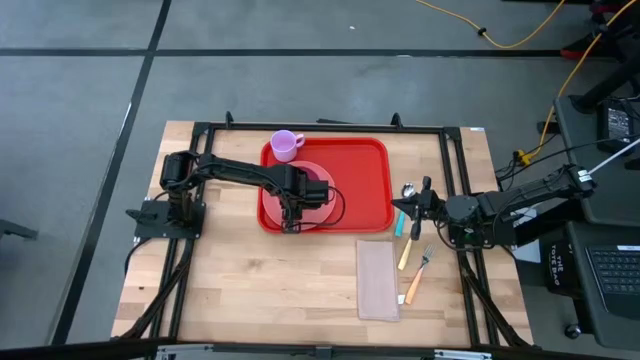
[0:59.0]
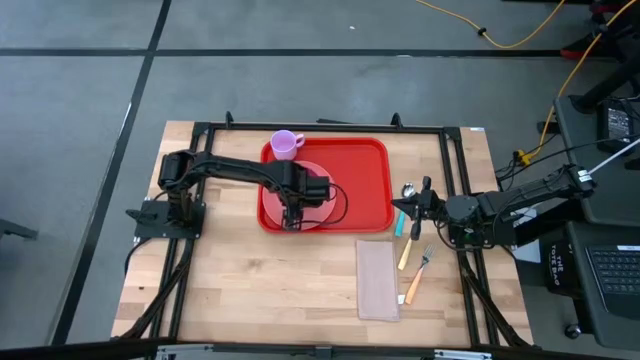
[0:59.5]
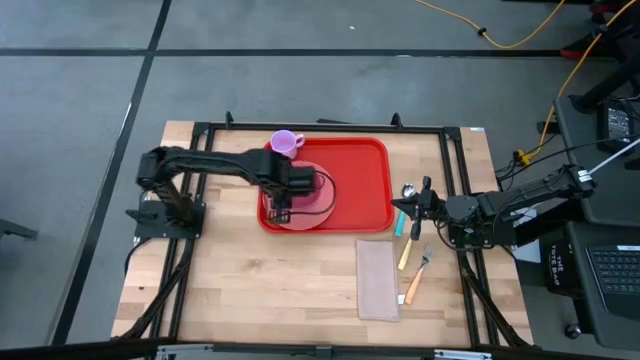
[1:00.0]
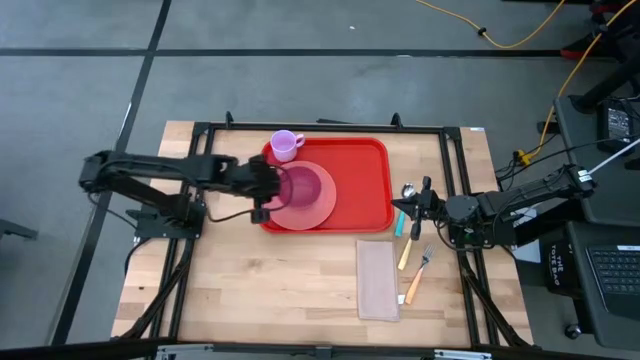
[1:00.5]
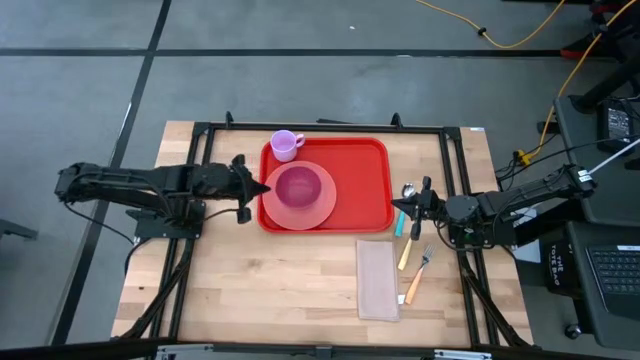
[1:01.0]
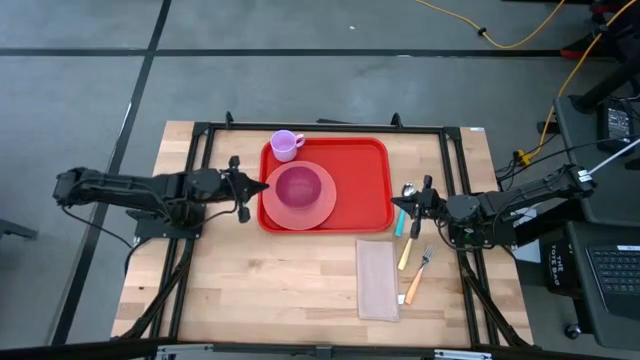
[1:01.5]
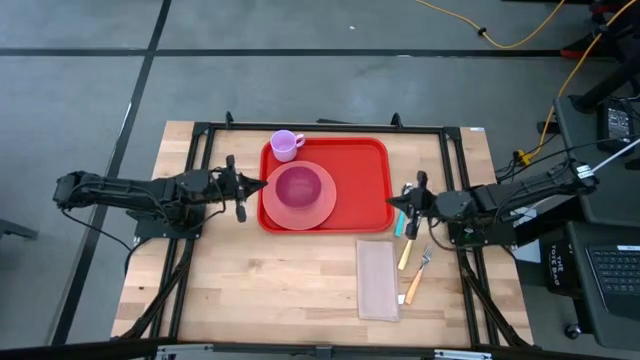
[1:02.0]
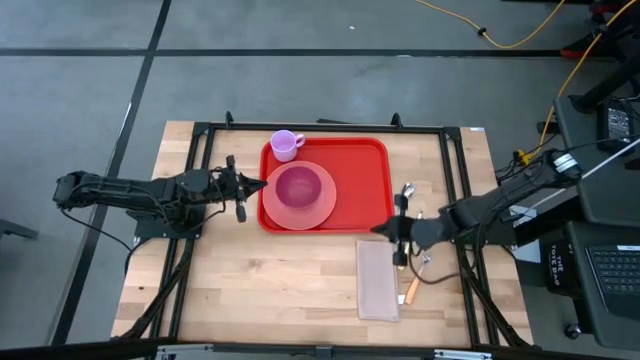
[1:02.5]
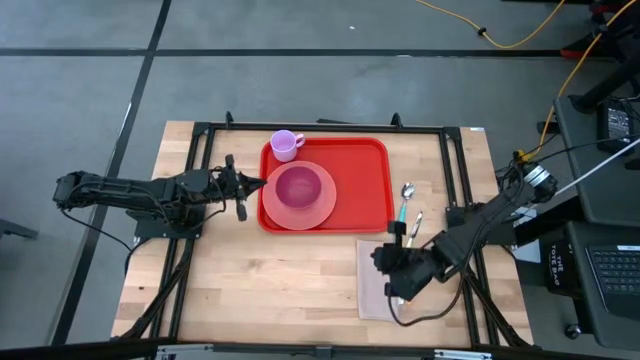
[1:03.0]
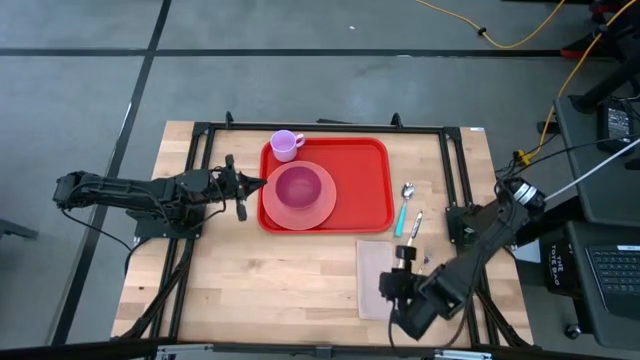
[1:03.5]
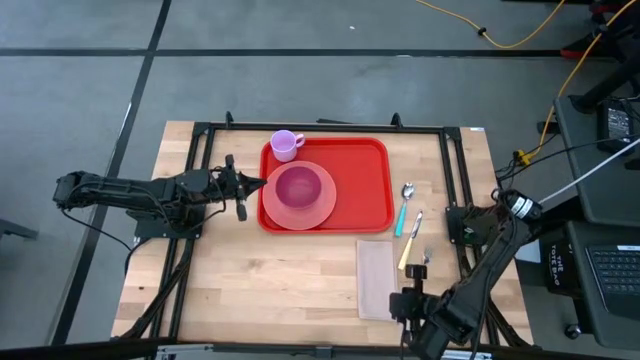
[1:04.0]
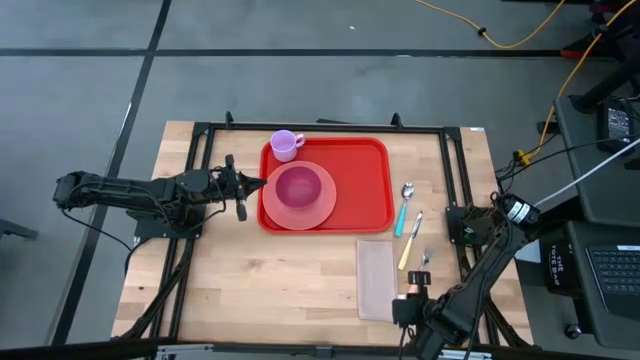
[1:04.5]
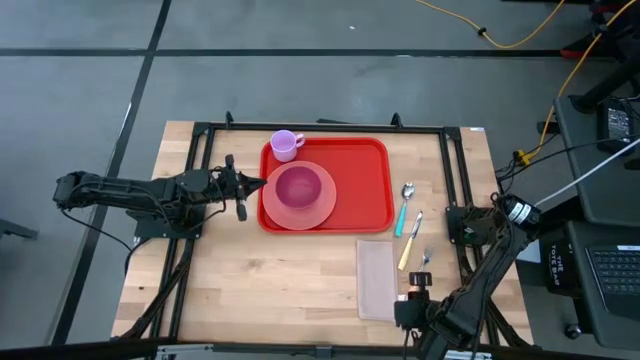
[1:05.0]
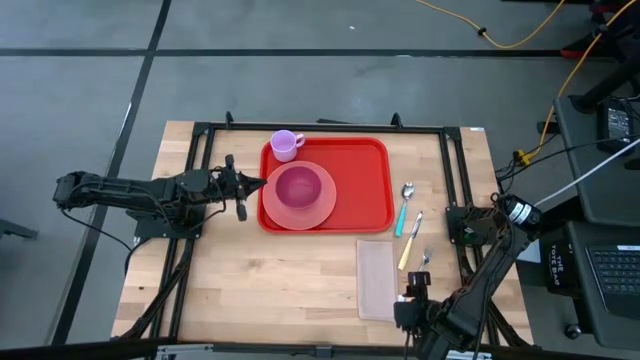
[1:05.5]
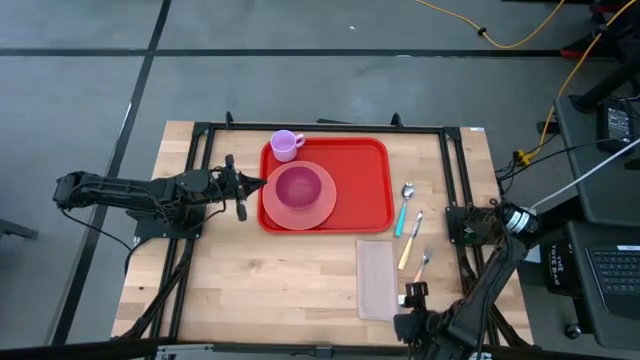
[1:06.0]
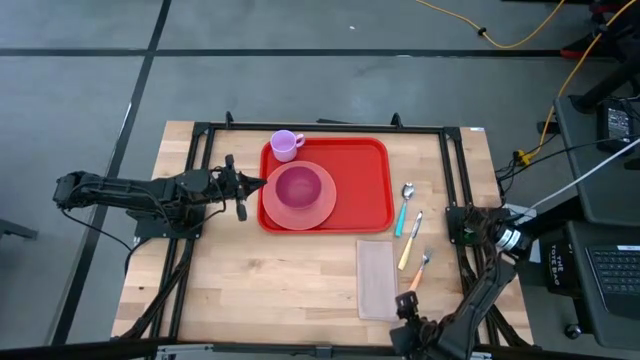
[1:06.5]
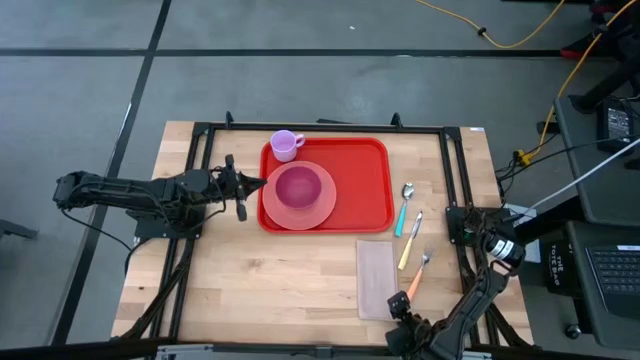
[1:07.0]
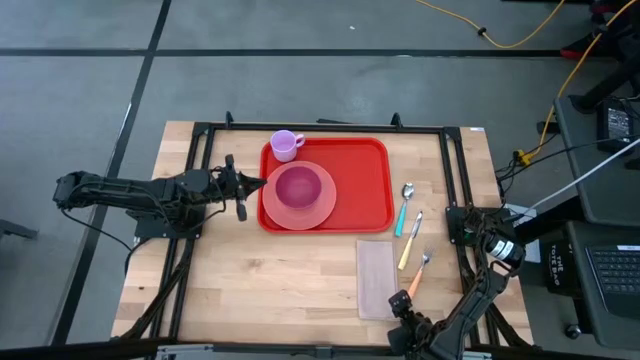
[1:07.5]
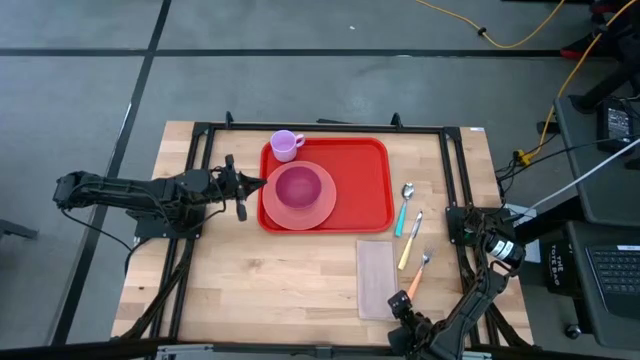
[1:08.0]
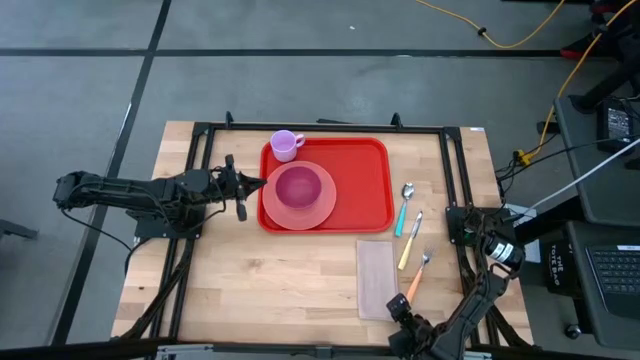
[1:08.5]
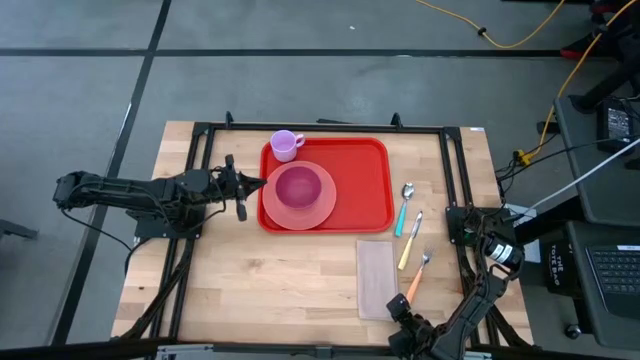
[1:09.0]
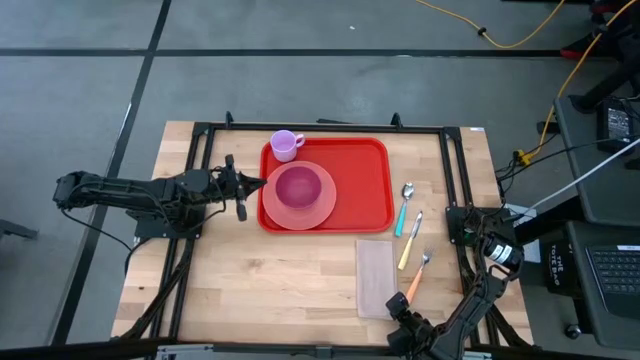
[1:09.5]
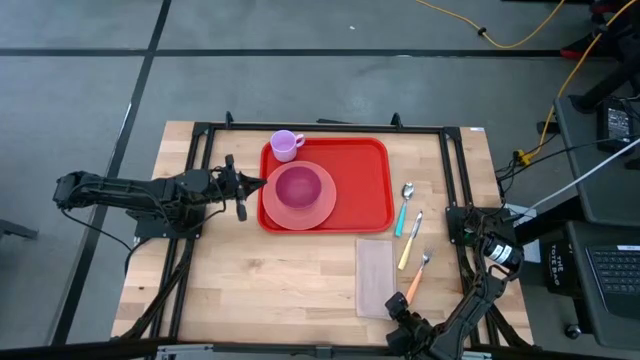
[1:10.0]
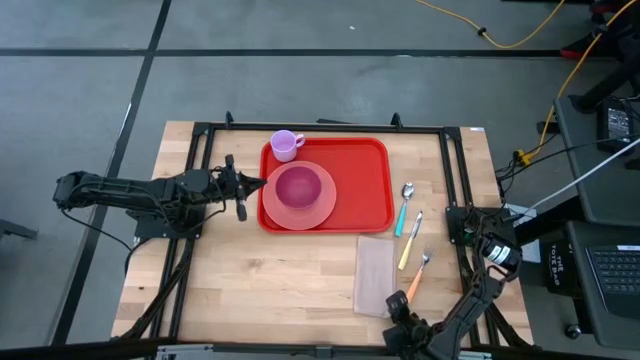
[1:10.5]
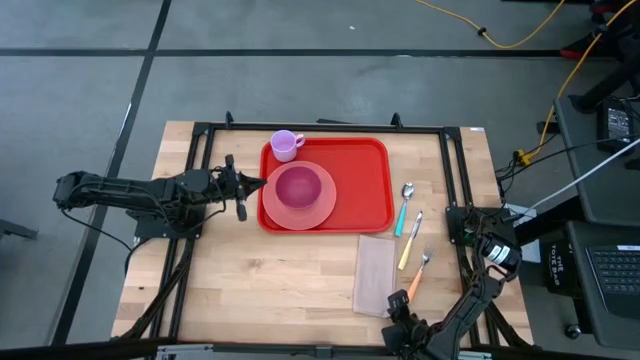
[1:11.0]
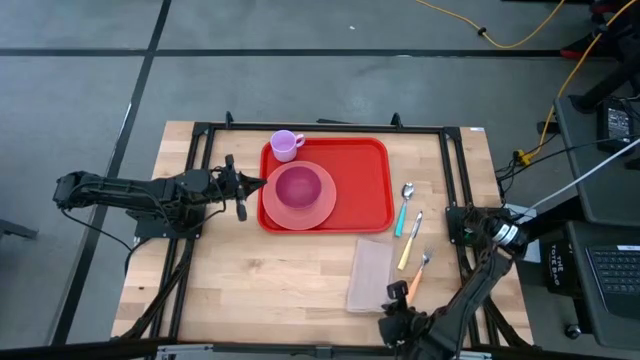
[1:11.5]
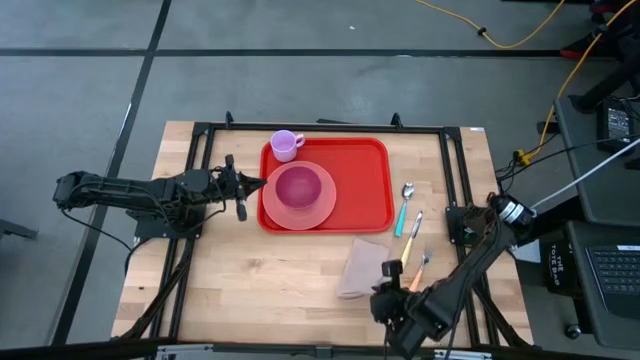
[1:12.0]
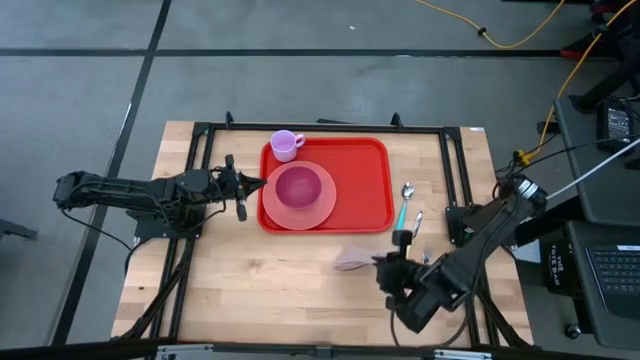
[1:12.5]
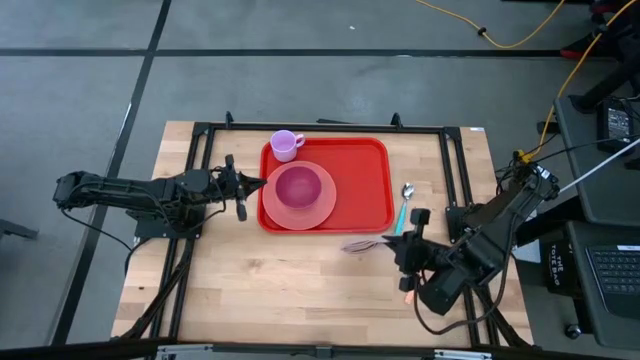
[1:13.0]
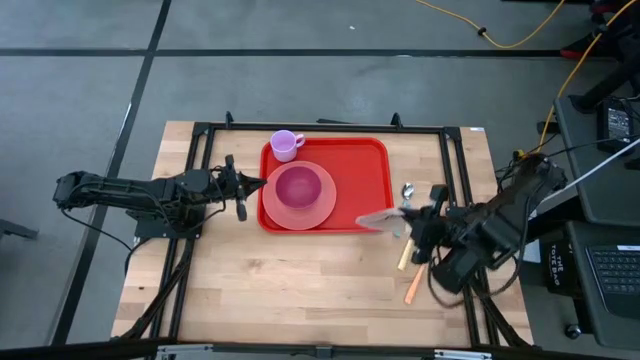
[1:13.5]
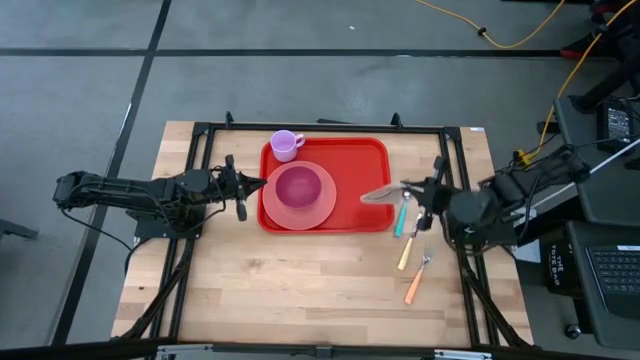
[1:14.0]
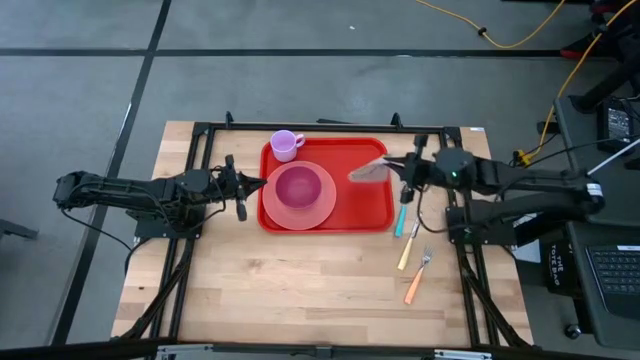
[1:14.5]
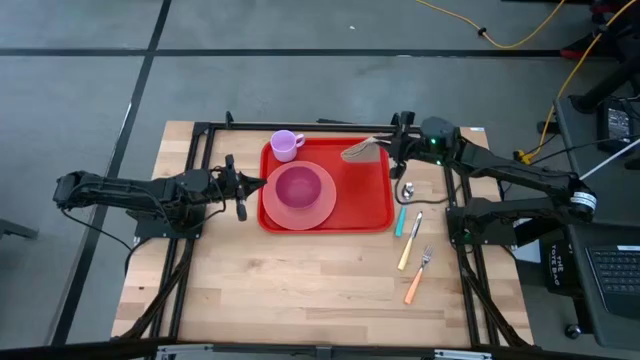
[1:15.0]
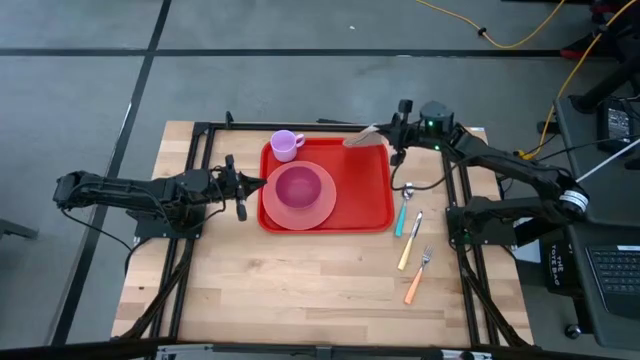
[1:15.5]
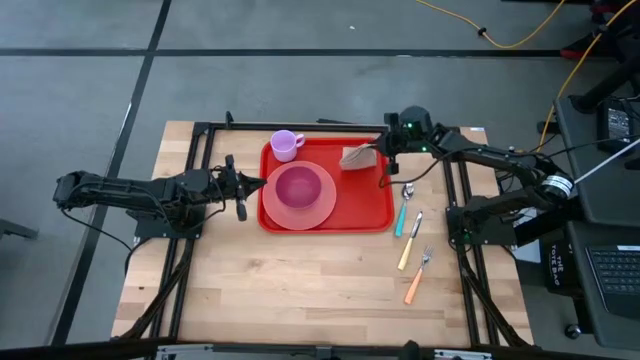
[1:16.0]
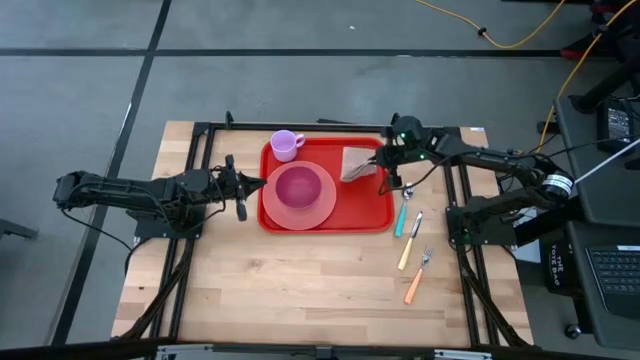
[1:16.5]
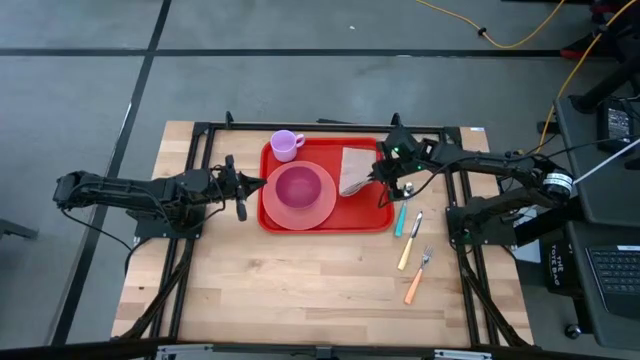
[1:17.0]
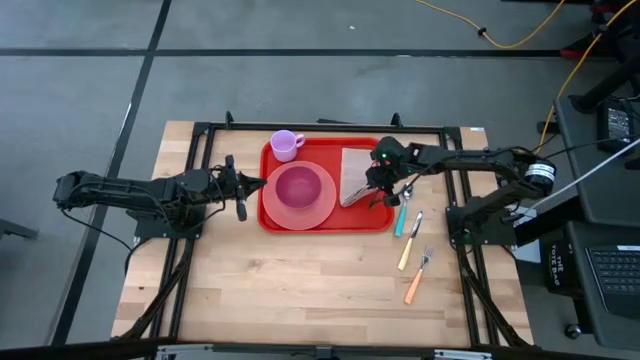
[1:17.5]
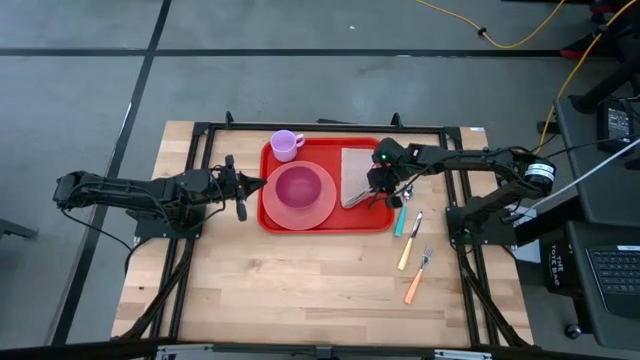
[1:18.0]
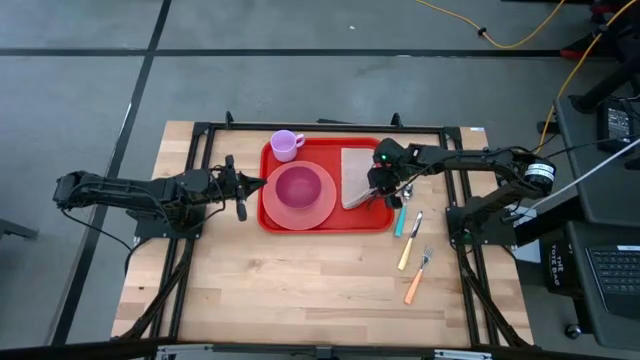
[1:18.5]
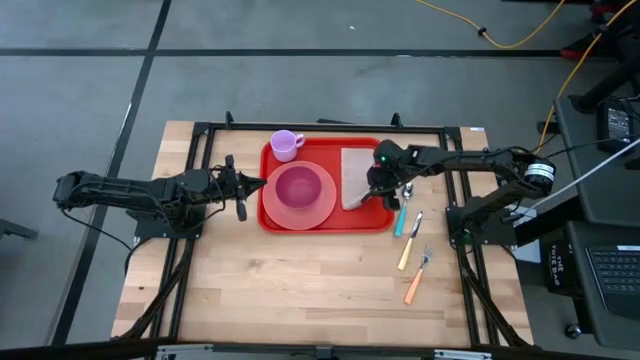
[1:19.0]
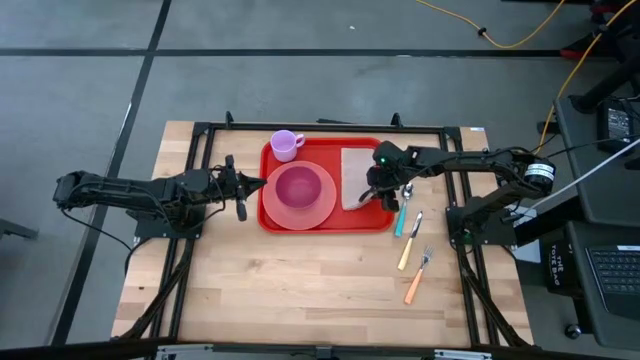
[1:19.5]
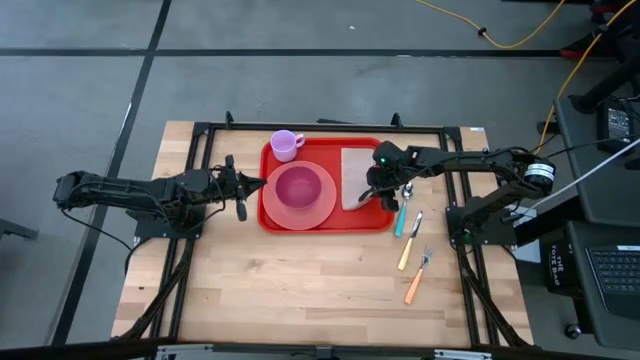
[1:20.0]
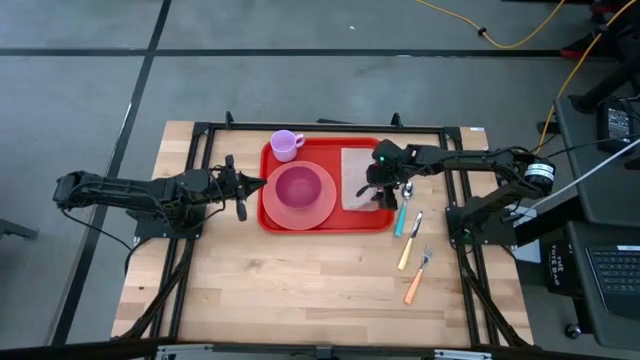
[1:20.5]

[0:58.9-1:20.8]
Task: Set up tray
Put the brown napkin to the right side of the pink plate on the red tray
